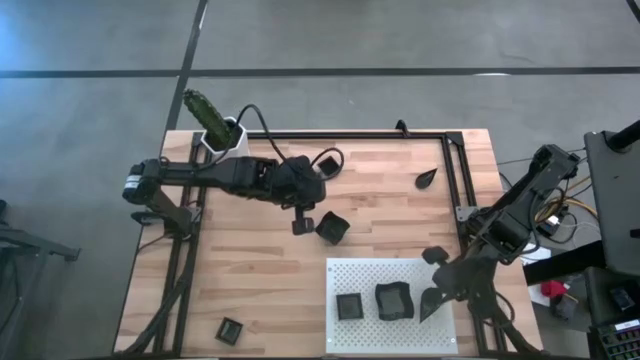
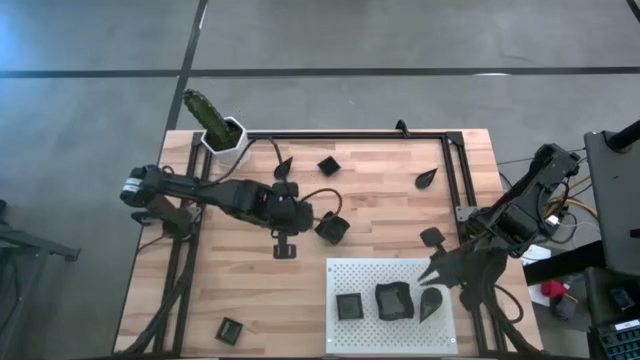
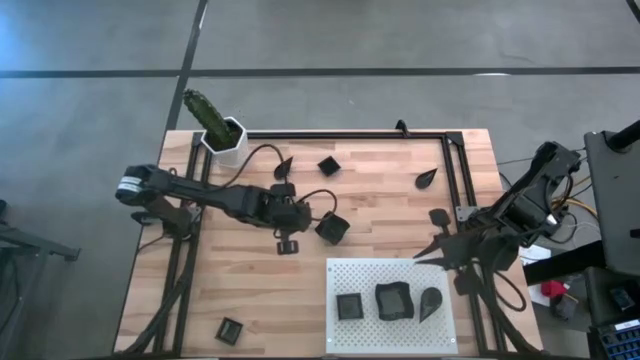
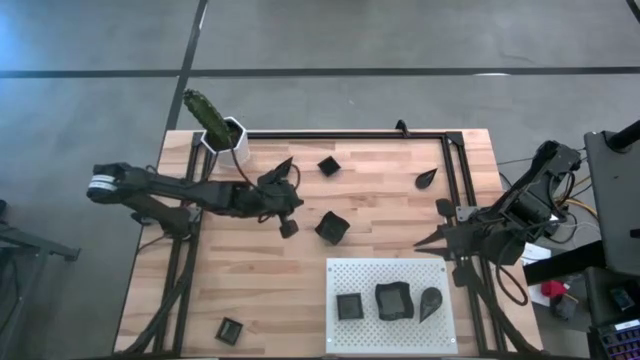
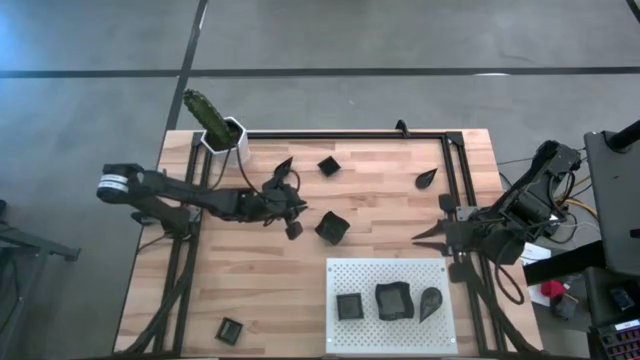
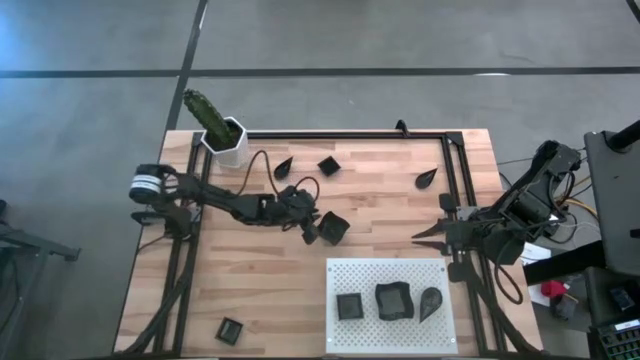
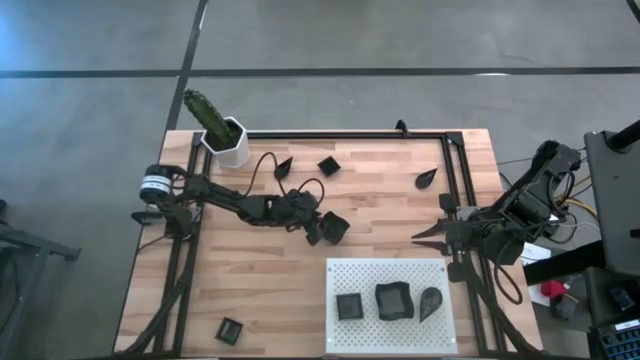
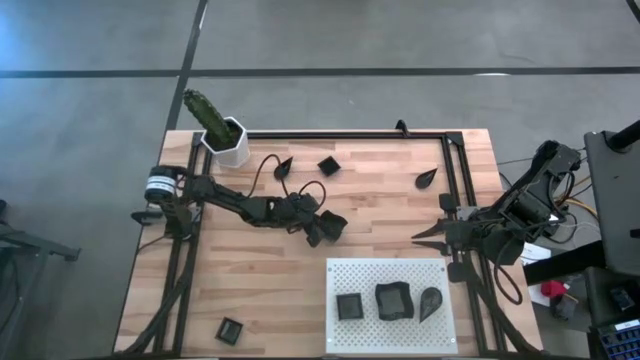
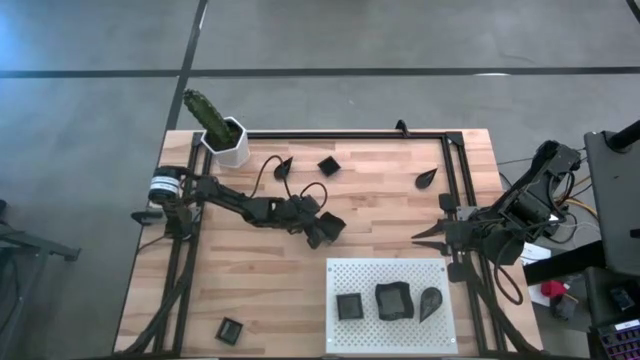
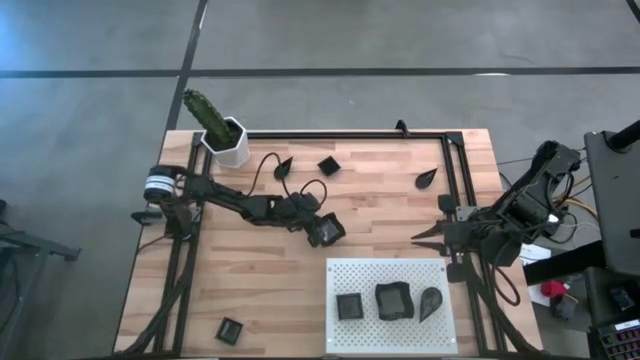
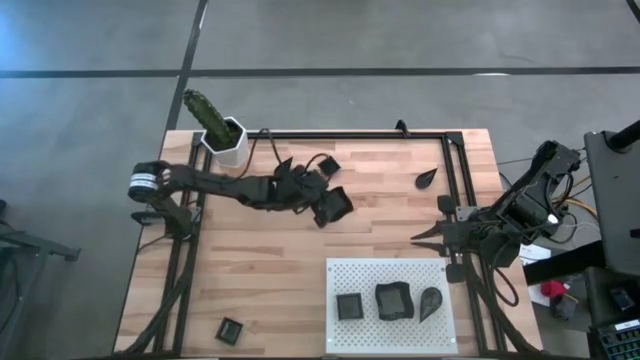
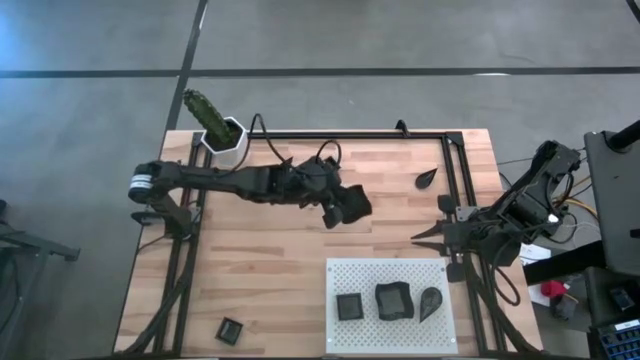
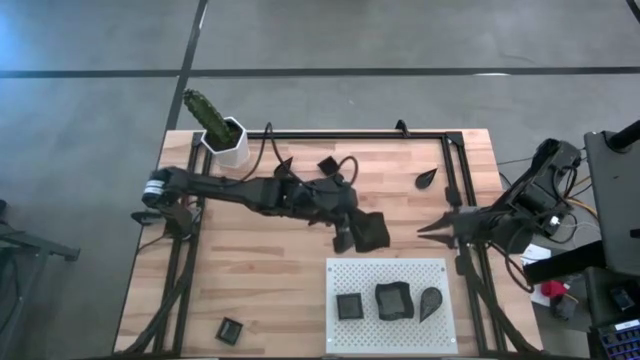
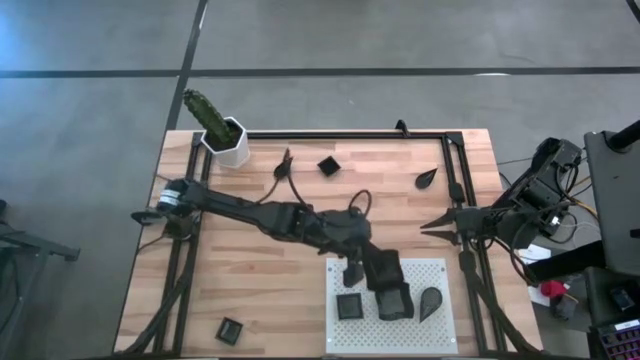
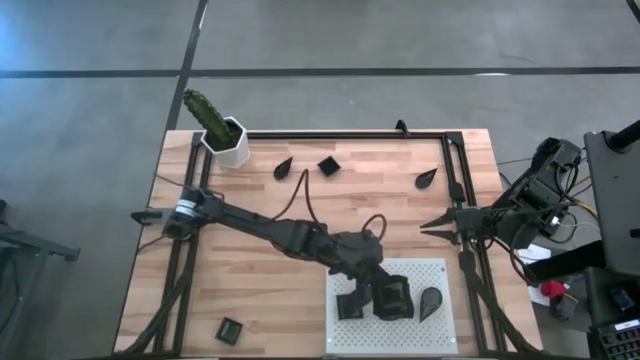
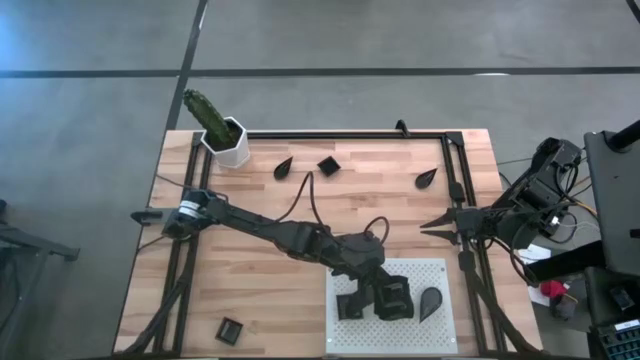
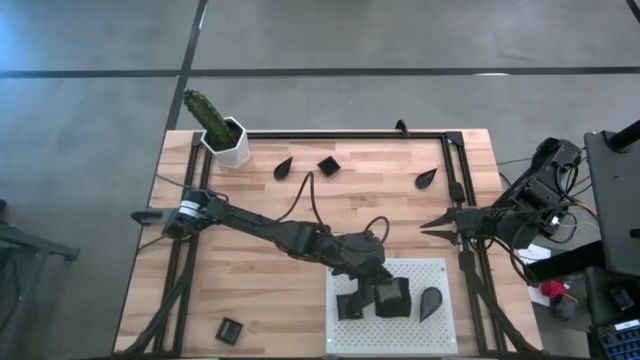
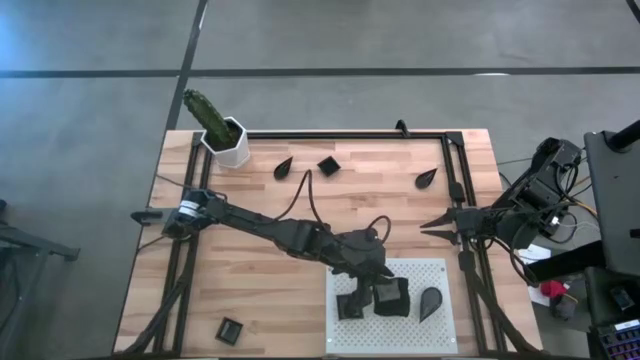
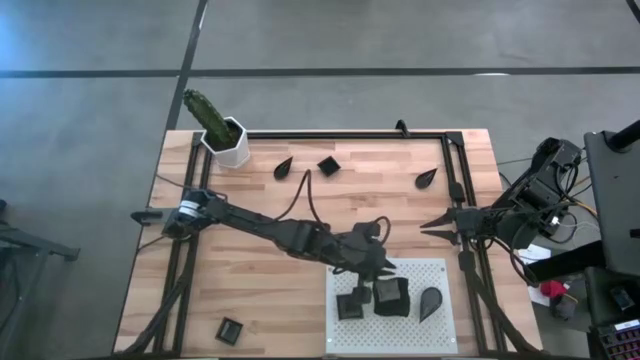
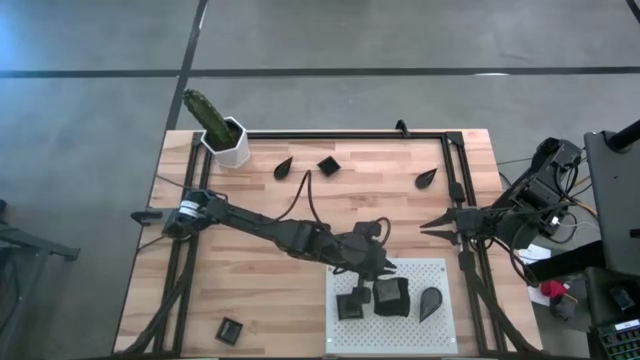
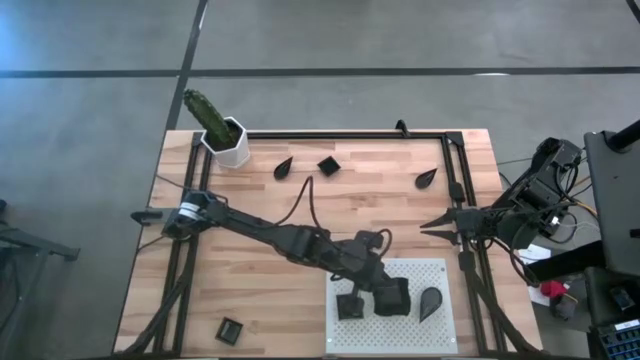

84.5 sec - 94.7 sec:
Task: Pick & Place Mini shaped plates
Stack the distorted square plate on top of the distorted square plate on the shelf

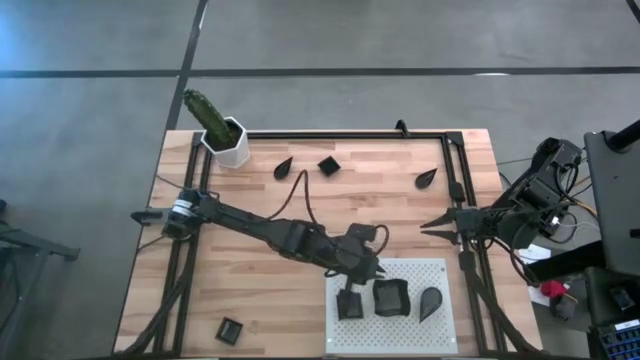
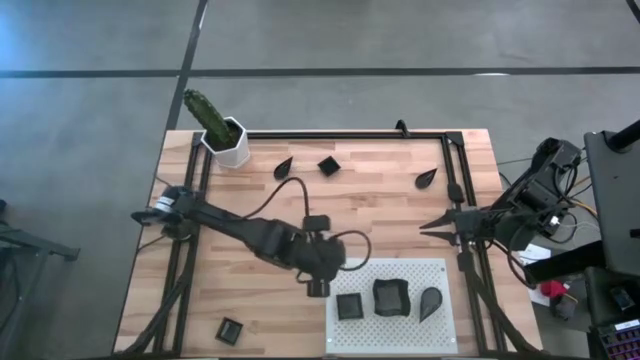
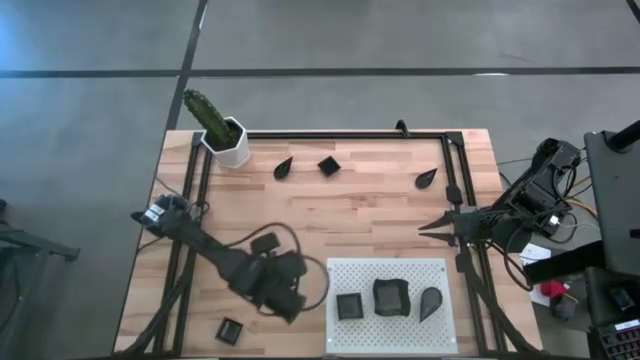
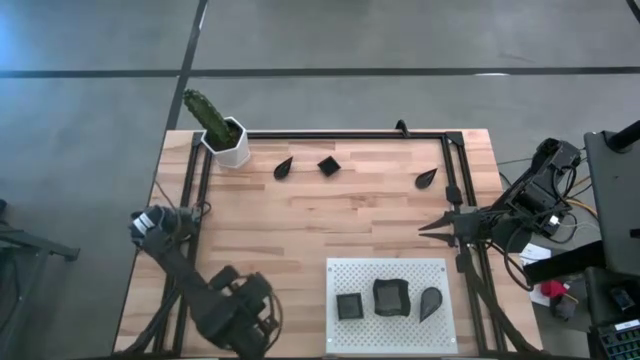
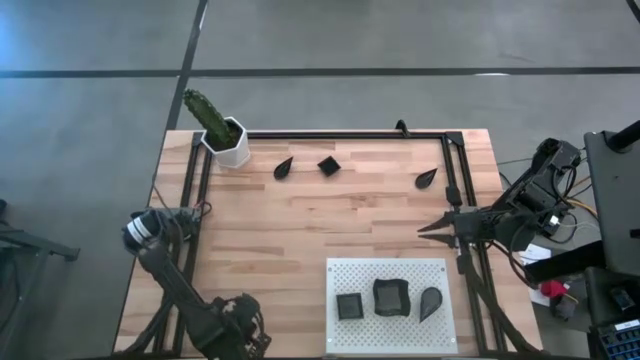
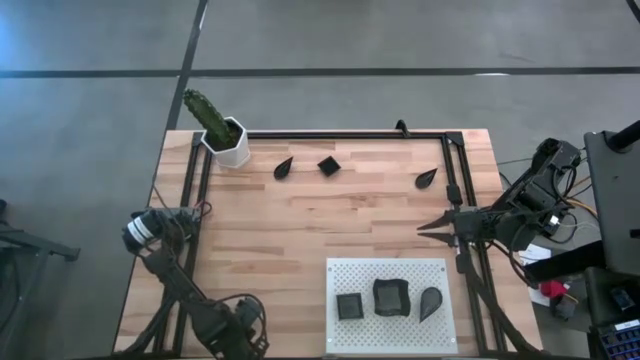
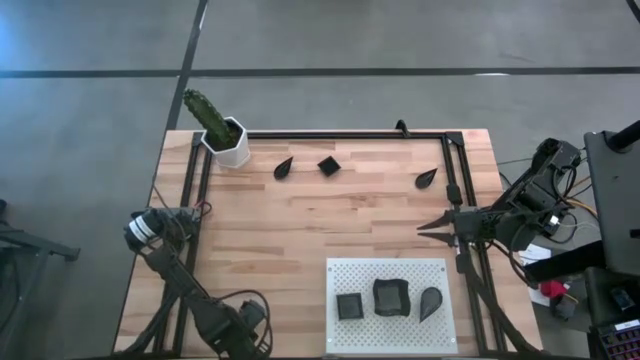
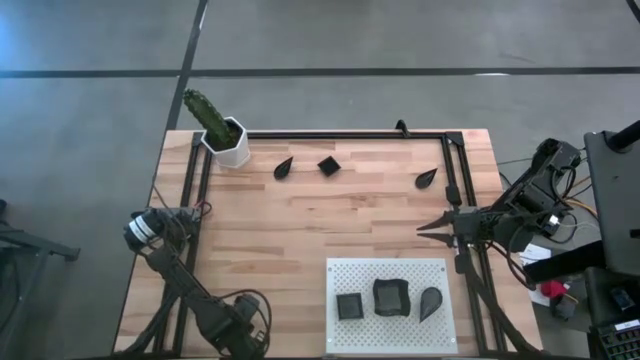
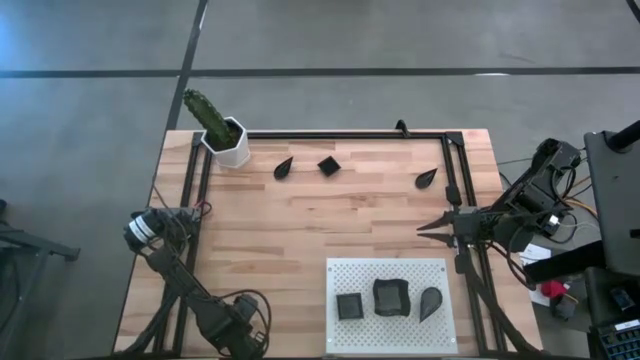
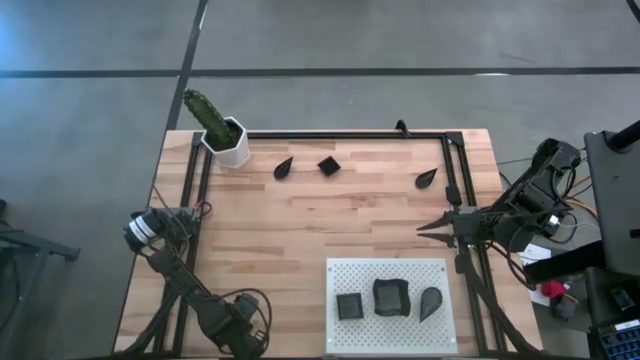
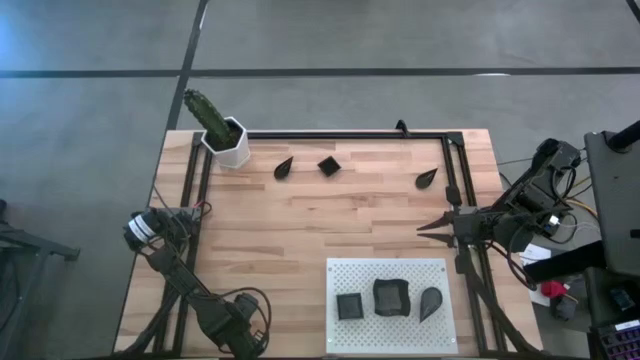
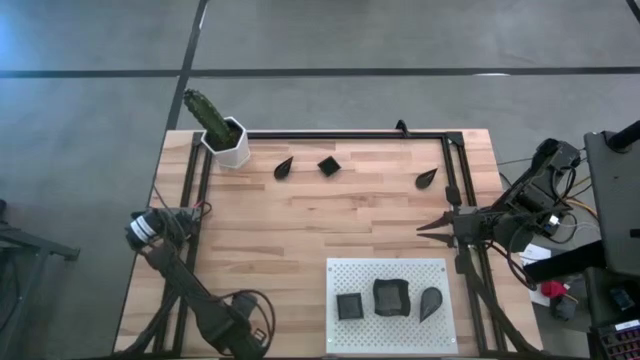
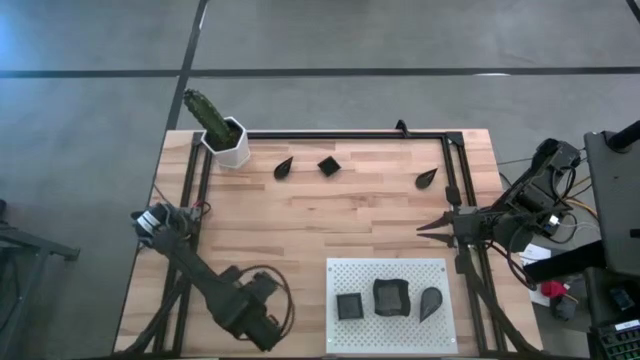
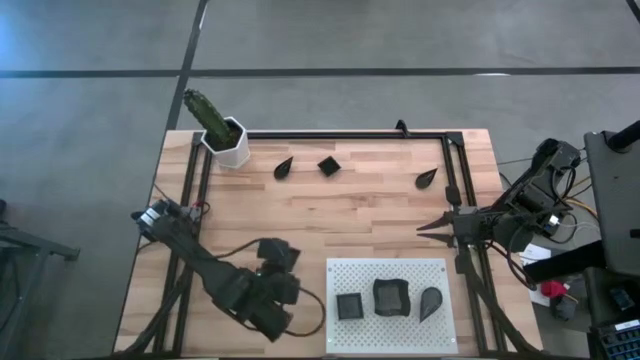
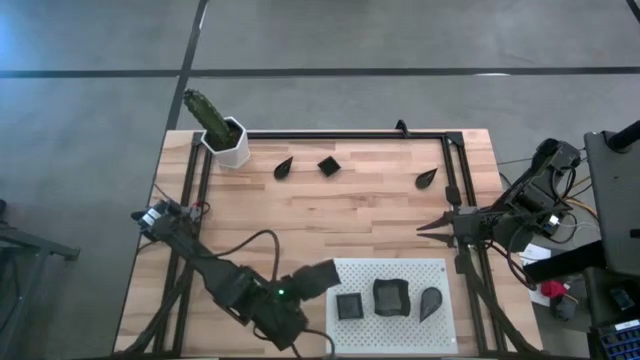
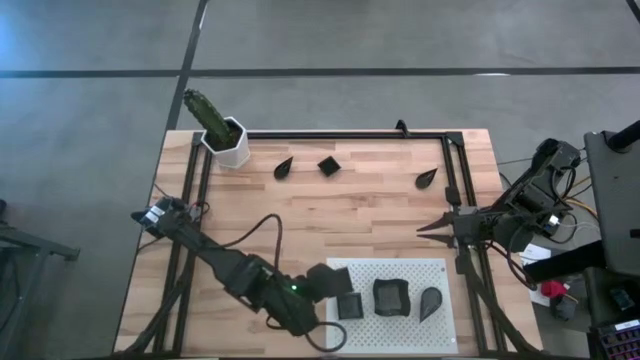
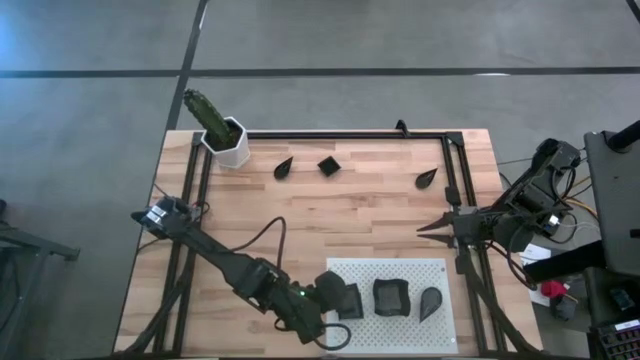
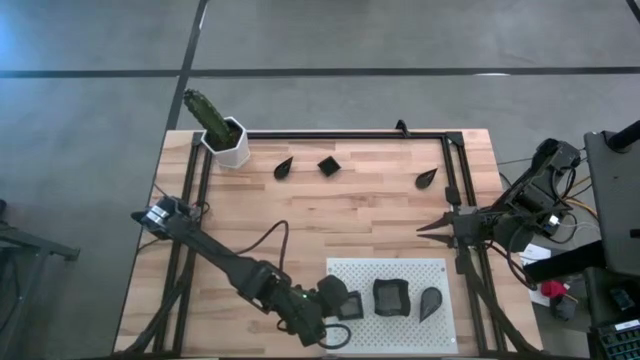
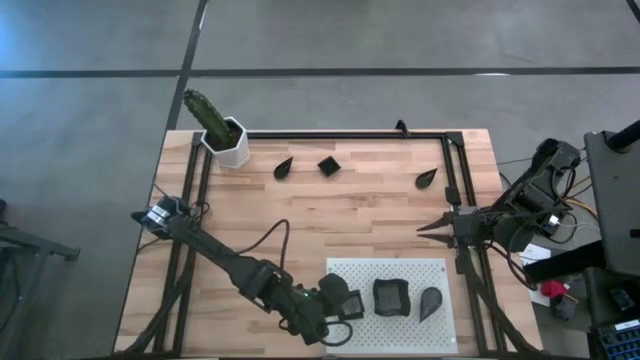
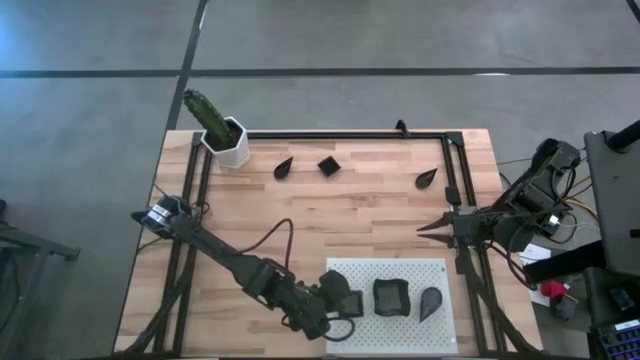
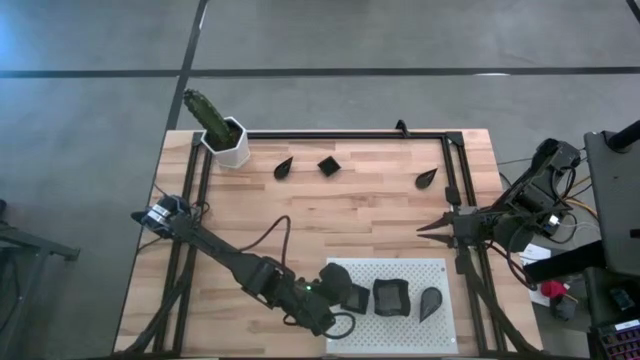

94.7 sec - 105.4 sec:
Stack the square plate on top of the square plate on the shelf
